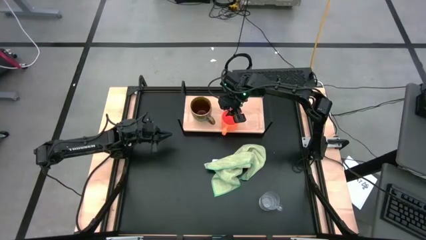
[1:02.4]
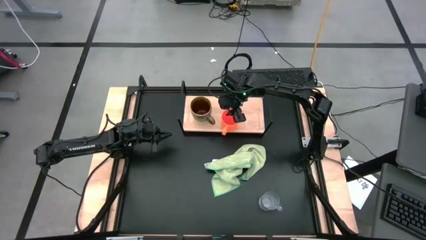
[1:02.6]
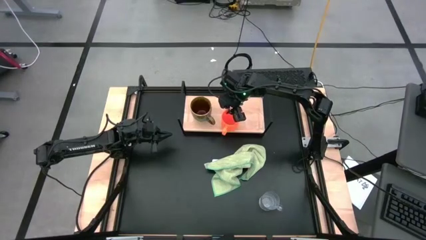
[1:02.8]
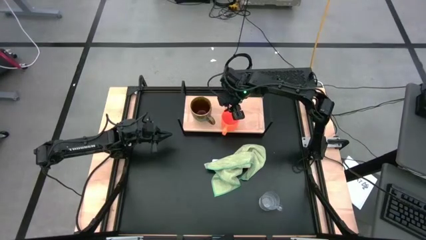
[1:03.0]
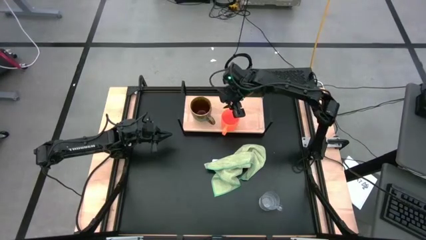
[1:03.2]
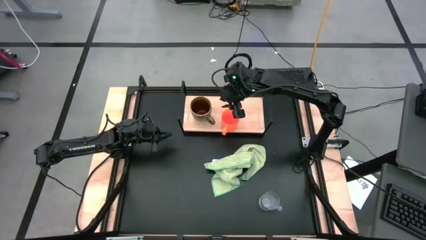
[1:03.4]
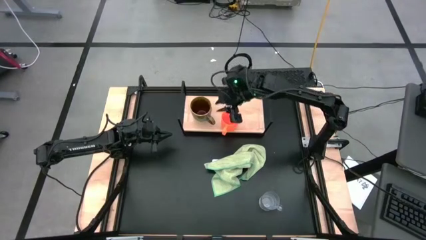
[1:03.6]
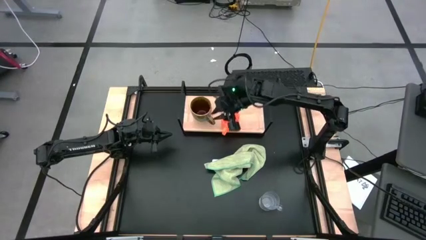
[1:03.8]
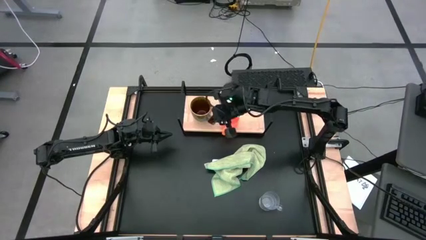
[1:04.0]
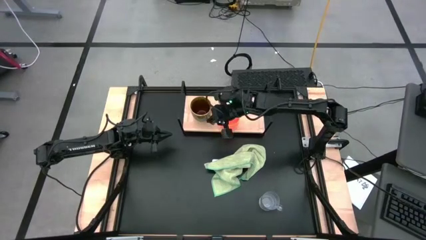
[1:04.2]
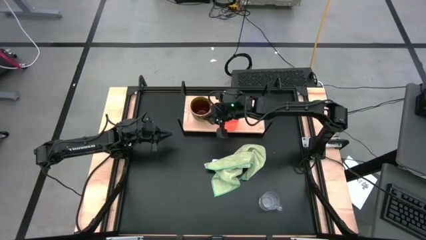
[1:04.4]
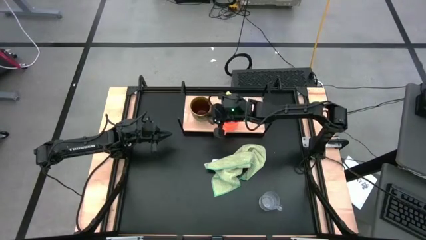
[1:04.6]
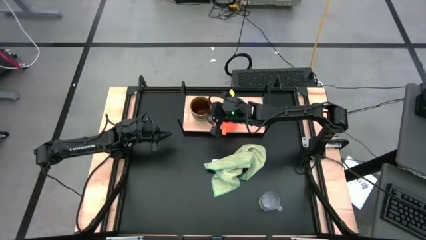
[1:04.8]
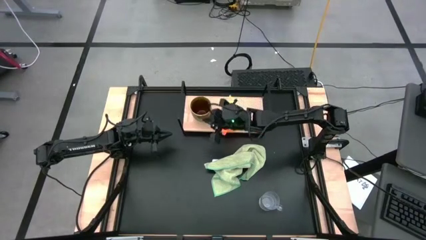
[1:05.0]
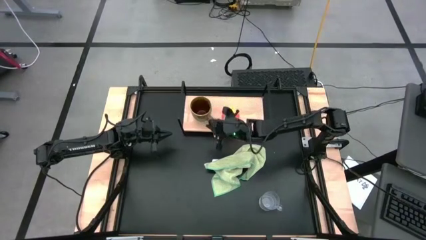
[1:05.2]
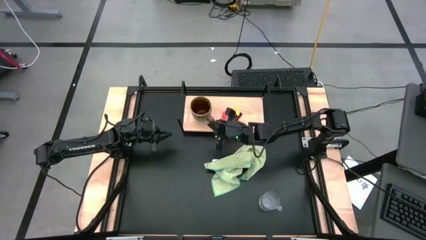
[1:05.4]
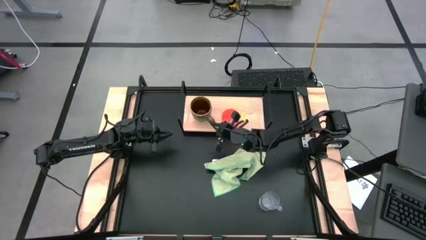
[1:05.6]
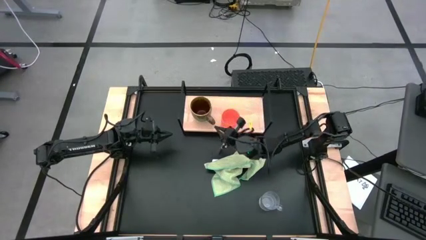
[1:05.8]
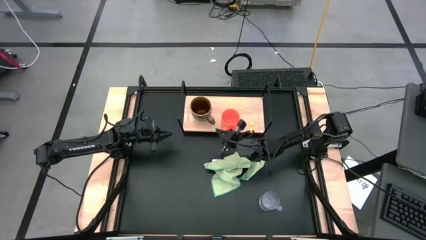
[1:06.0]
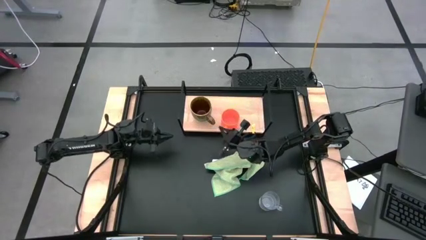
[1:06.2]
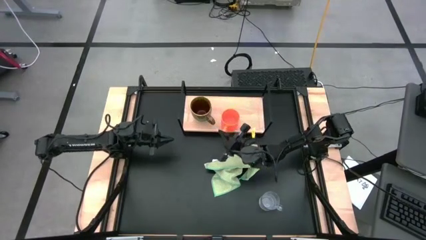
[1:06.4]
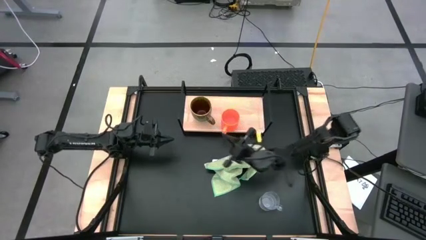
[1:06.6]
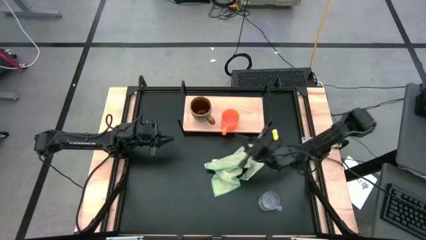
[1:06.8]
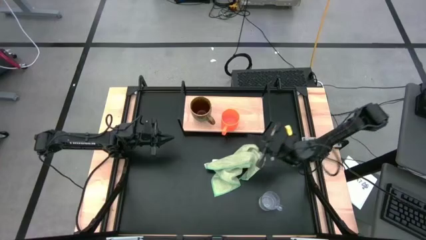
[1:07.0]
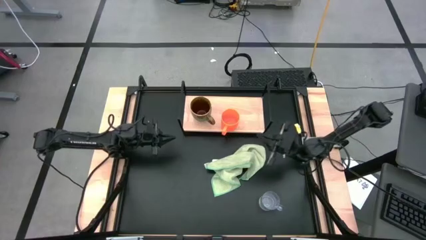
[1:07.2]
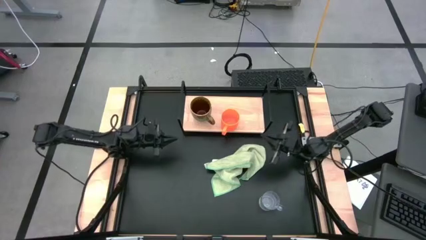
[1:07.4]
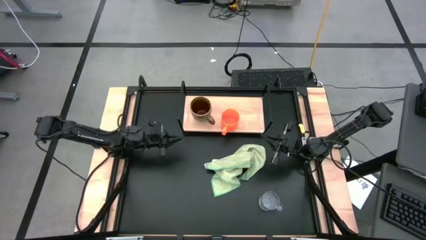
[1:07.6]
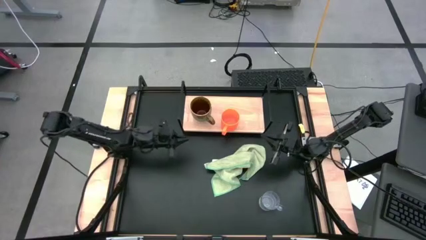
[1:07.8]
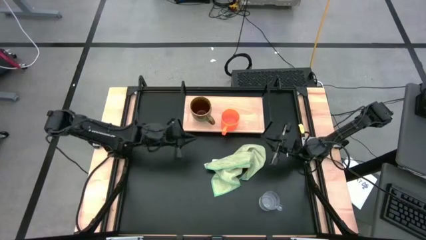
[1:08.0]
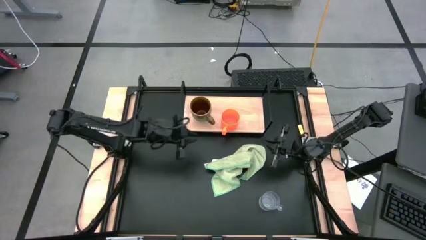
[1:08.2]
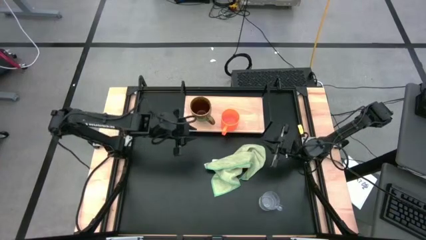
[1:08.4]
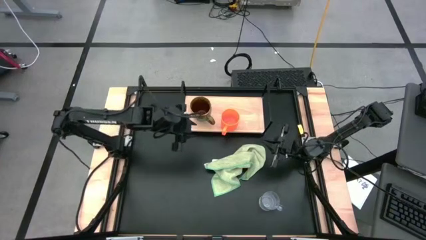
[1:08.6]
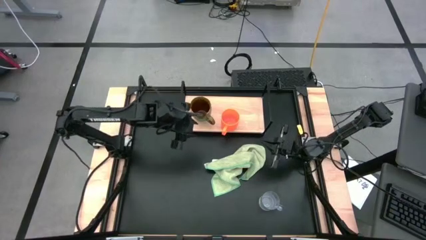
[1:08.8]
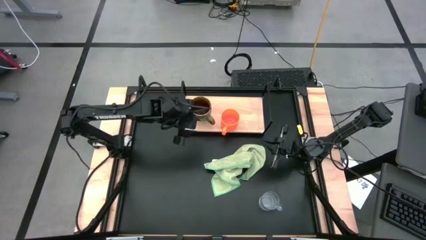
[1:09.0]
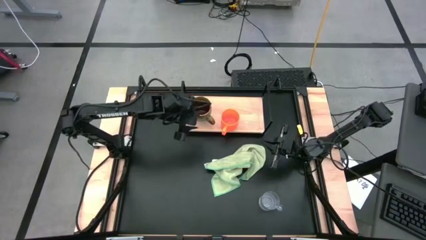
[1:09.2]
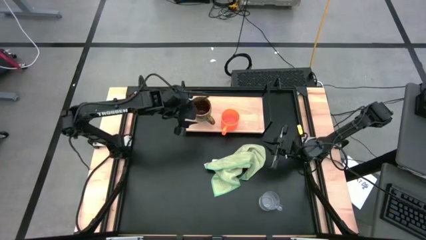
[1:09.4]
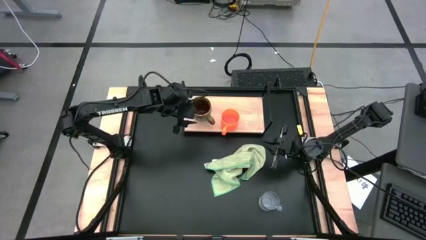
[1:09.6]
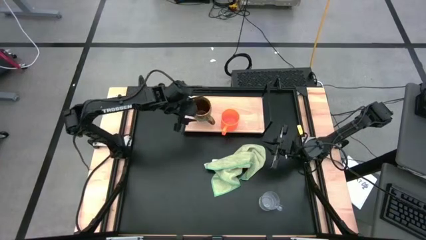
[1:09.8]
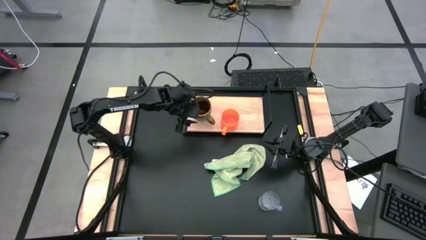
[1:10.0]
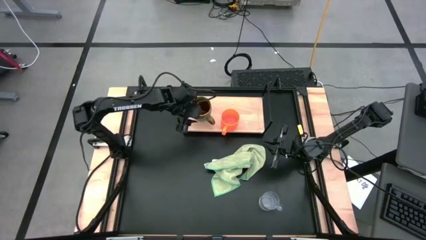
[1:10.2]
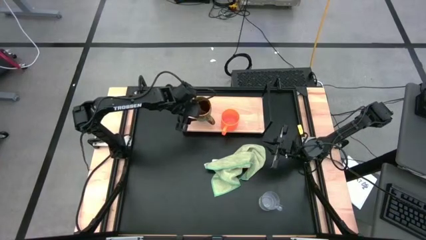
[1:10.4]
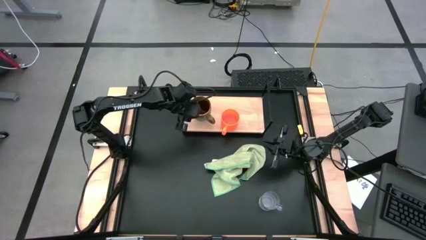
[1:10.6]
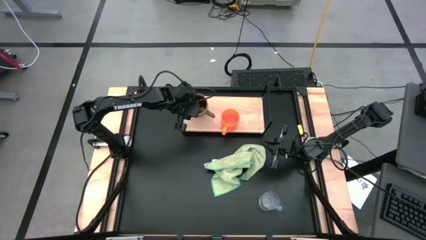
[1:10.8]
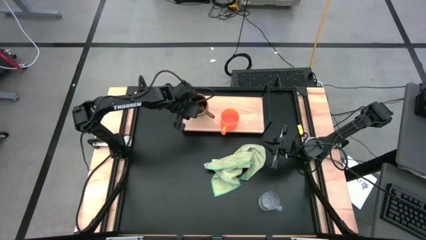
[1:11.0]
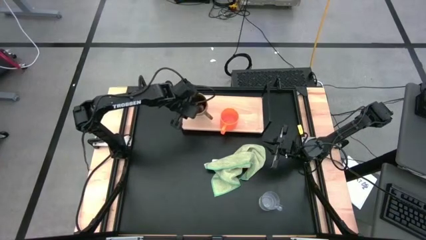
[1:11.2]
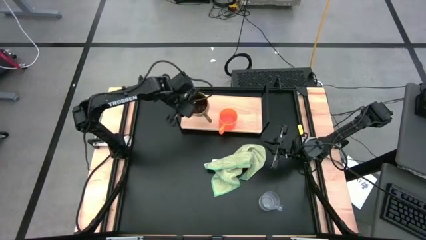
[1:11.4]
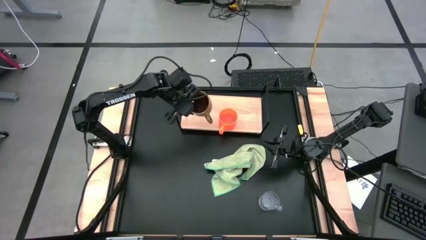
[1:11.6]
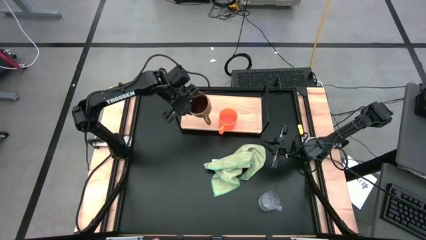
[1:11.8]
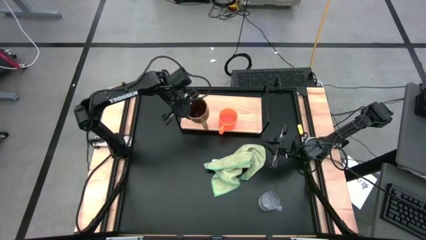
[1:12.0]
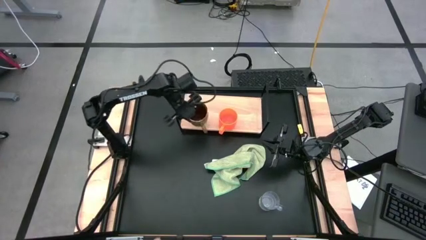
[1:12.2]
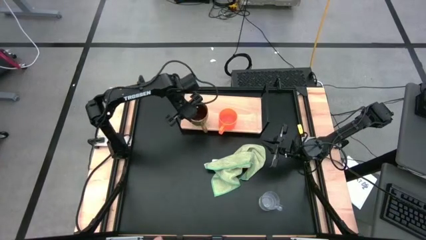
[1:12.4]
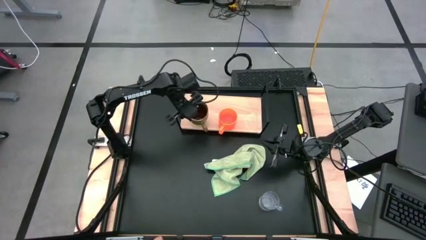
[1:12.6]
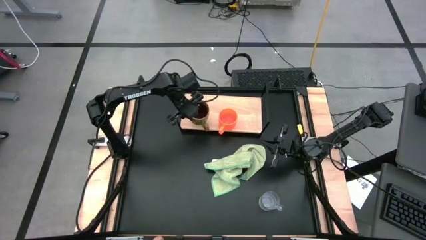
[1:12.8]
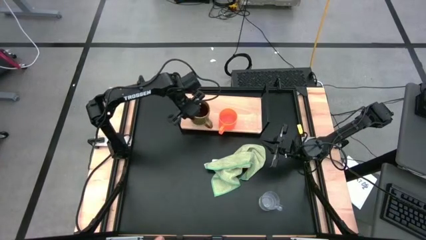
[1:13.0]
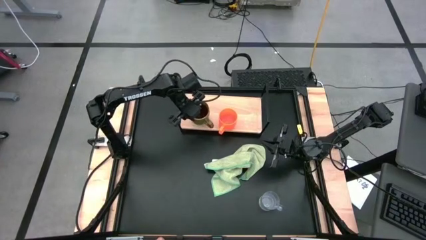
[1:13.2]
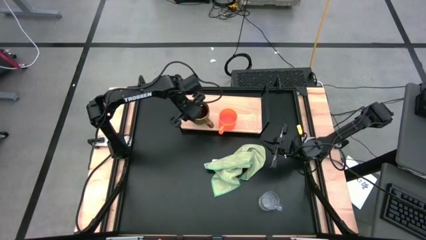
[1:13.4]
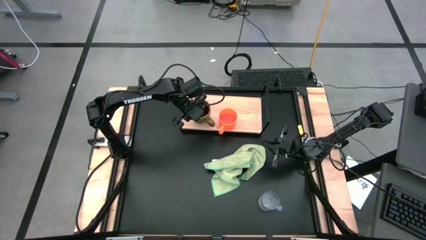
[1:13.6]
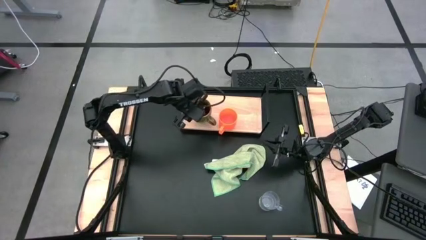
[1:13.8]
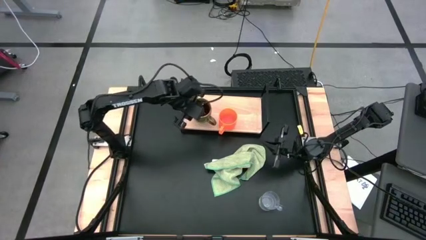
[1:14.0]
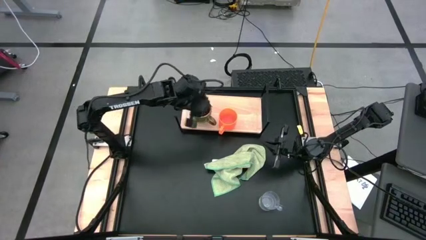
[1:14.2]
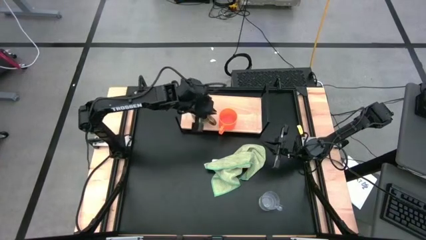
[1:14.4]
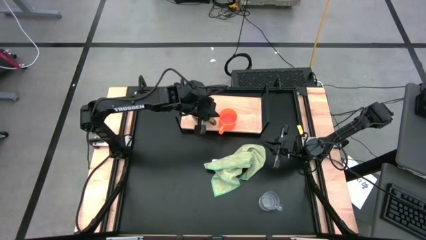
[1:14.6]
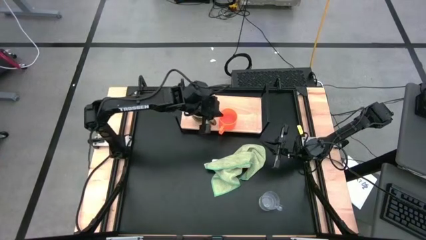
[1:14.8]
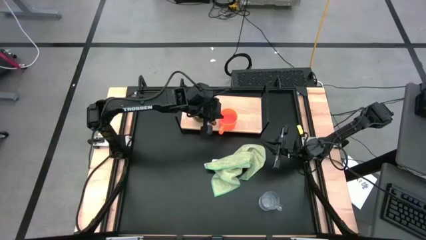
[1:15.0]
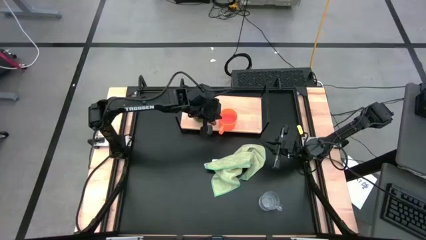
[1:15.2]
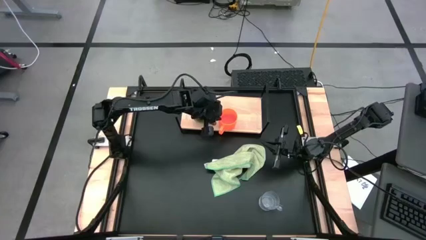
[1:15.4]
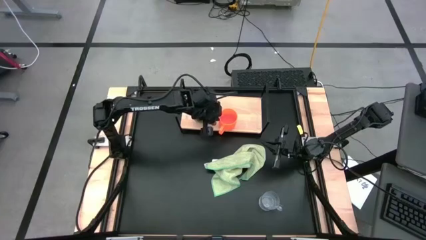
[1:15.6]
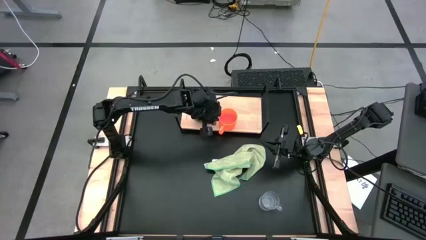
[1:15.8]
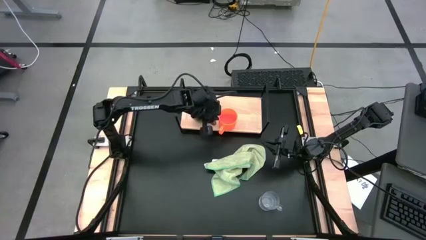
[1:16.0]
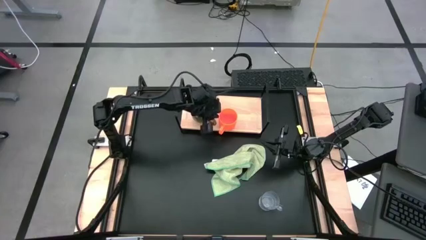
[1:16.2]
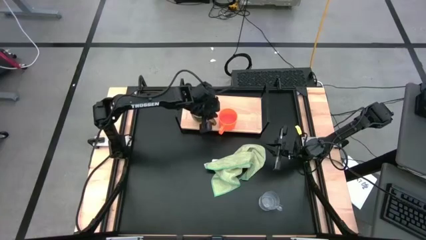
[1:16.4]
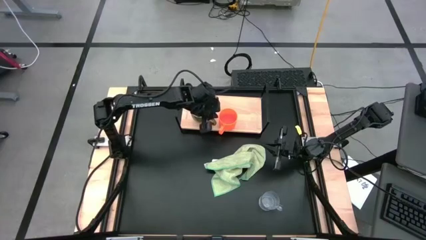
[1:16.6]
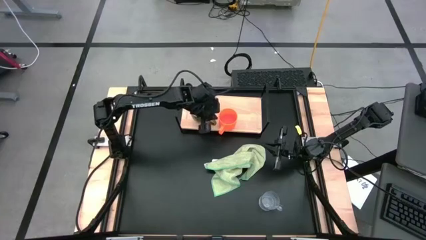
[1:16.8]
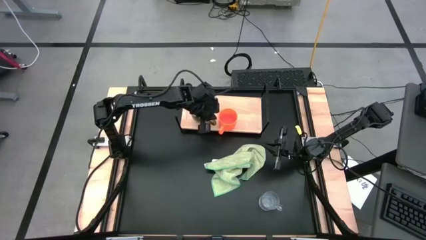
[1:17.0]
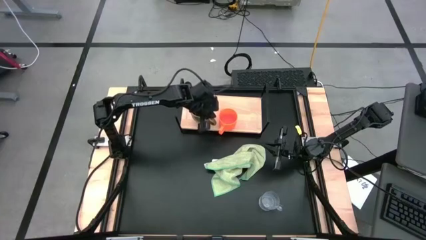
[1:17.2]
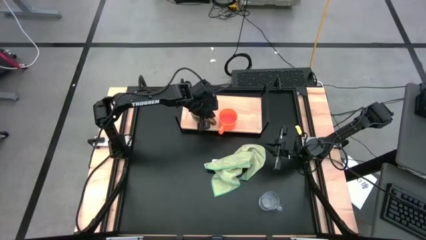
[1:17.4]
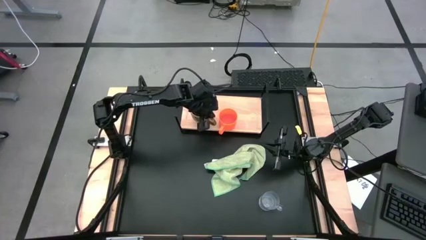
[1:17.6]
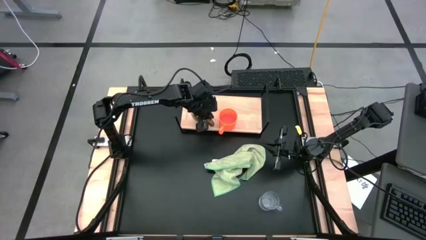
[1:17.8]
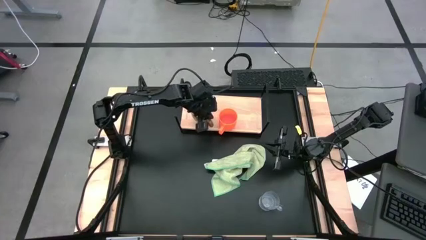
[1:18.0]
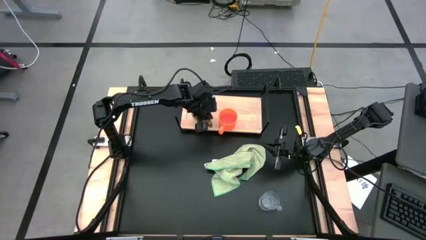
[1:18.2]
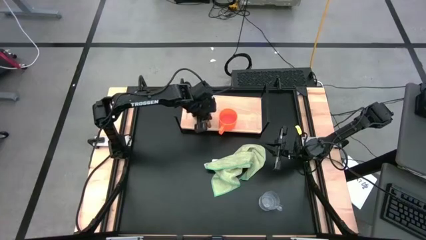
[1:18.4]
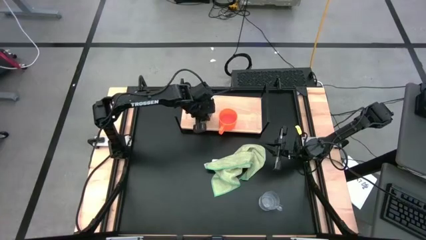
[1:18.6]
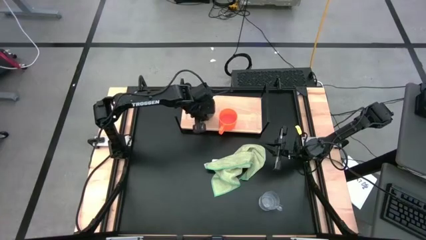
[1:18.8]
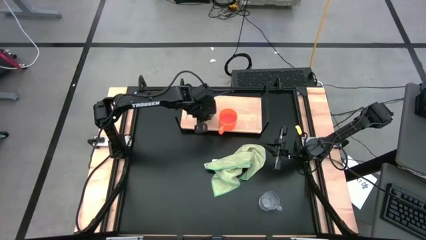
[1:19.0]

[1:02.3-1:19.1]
Task: Stack small to large cups/mugs on shelf
Adjust the green mug
